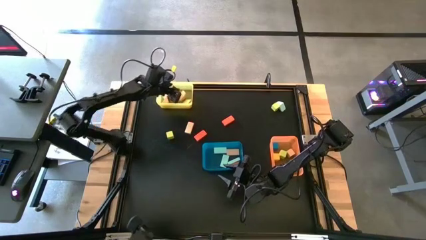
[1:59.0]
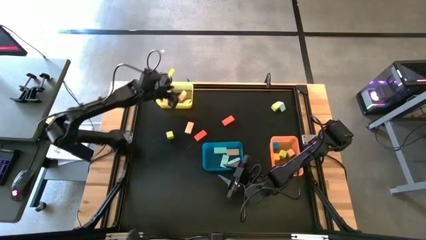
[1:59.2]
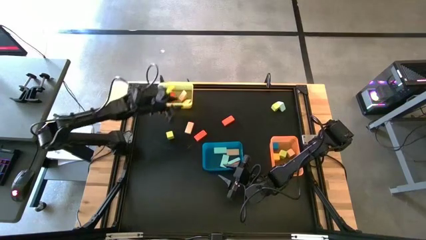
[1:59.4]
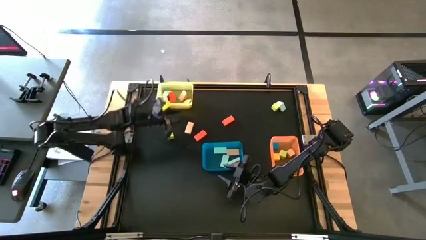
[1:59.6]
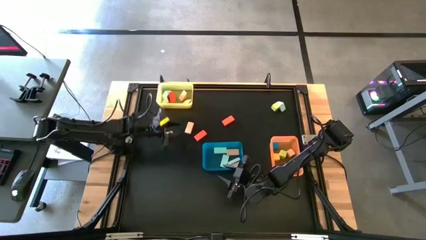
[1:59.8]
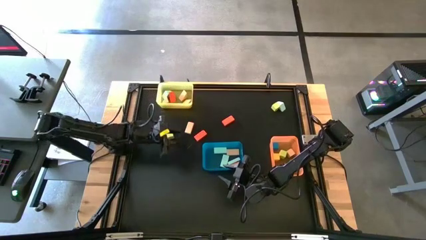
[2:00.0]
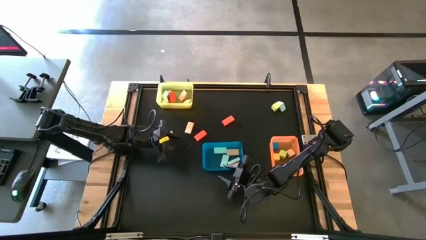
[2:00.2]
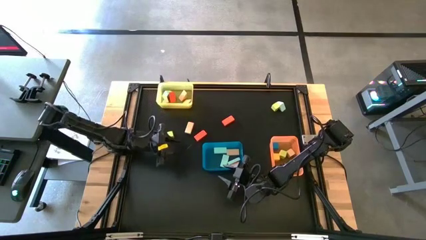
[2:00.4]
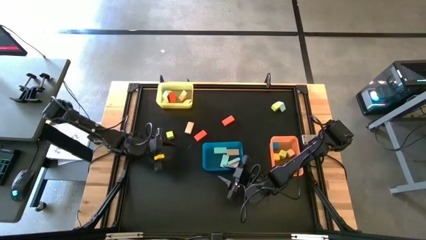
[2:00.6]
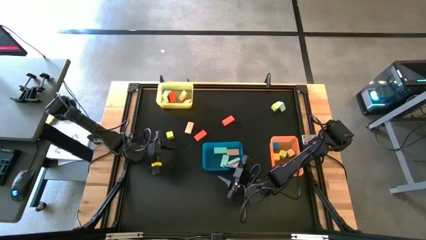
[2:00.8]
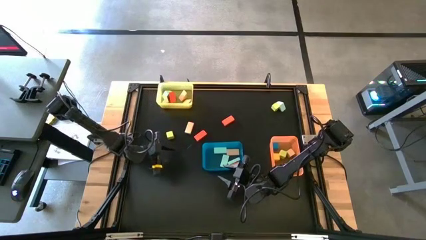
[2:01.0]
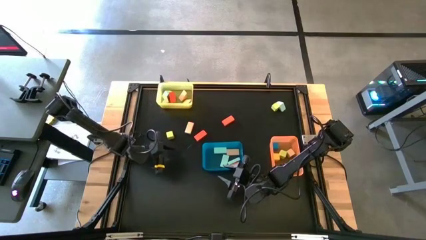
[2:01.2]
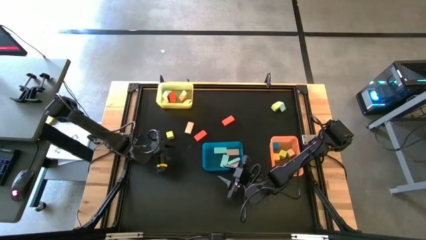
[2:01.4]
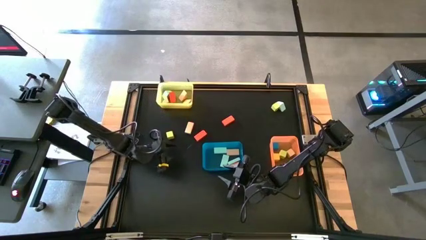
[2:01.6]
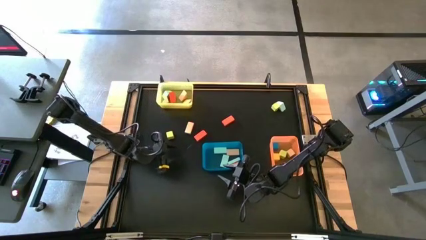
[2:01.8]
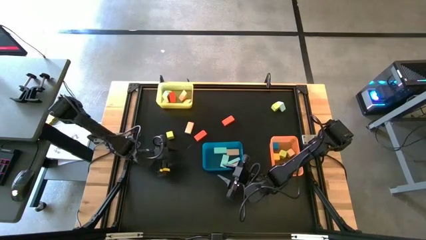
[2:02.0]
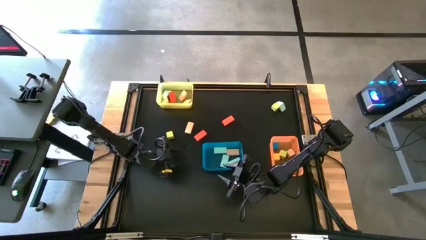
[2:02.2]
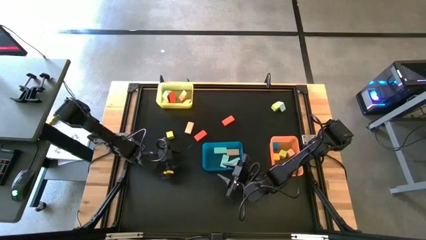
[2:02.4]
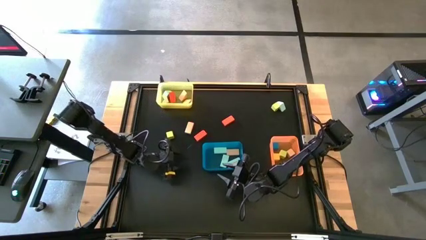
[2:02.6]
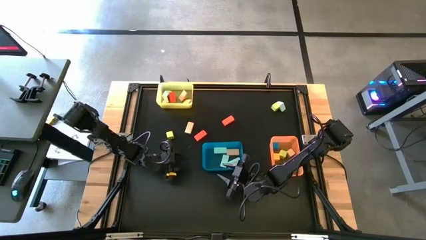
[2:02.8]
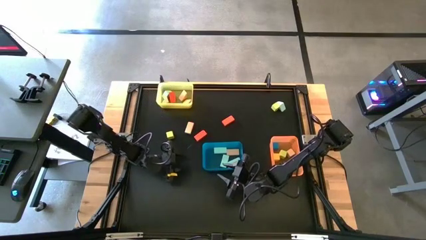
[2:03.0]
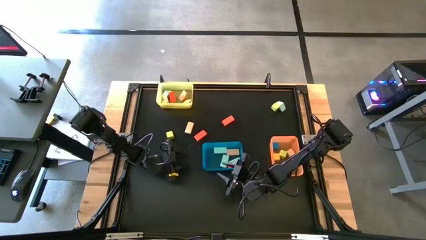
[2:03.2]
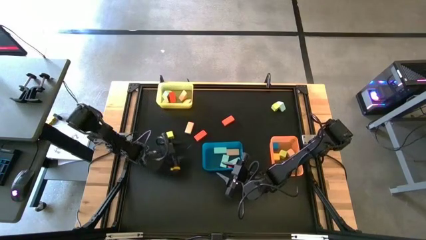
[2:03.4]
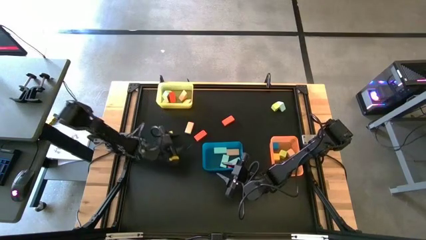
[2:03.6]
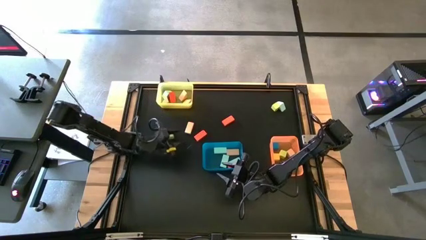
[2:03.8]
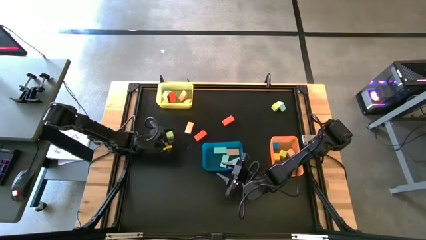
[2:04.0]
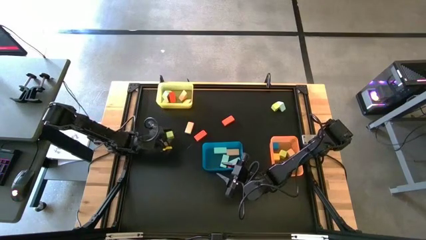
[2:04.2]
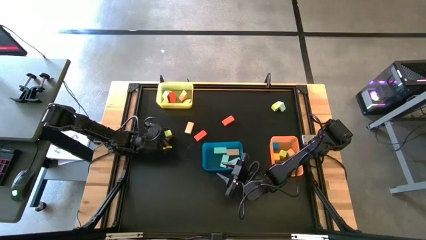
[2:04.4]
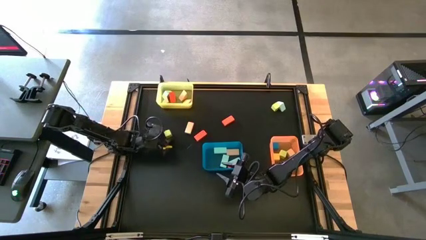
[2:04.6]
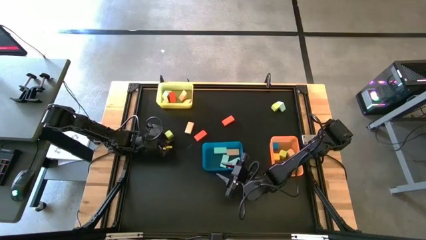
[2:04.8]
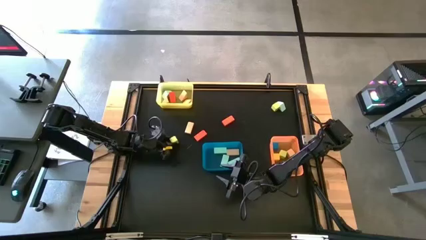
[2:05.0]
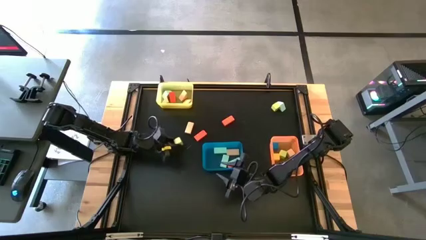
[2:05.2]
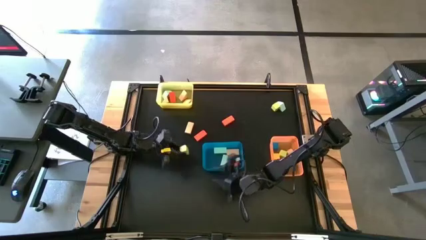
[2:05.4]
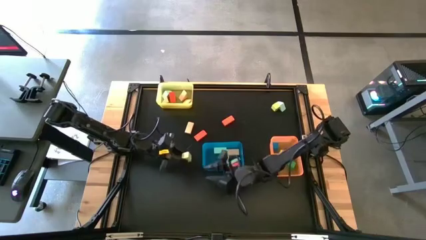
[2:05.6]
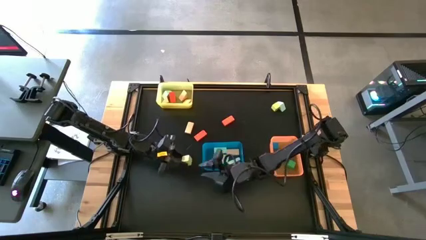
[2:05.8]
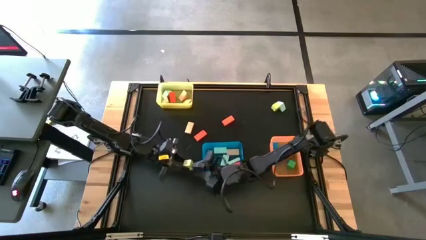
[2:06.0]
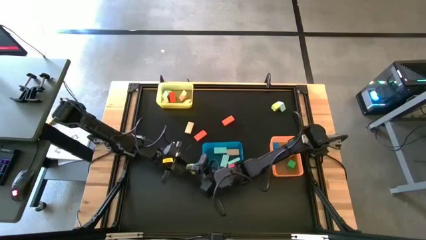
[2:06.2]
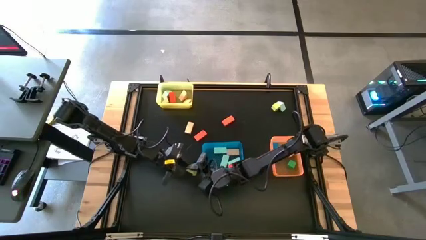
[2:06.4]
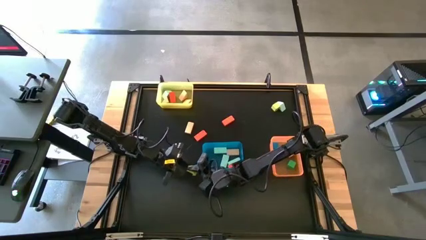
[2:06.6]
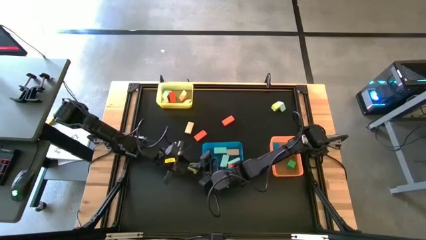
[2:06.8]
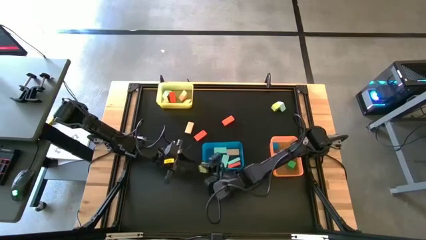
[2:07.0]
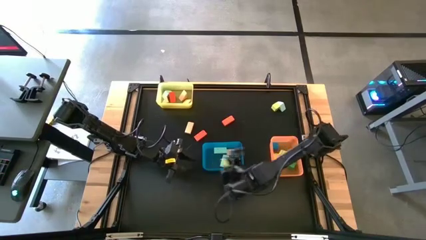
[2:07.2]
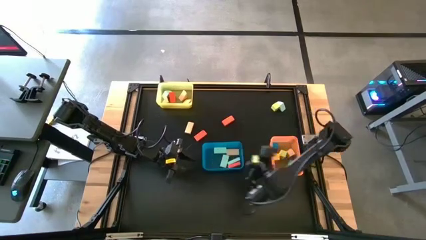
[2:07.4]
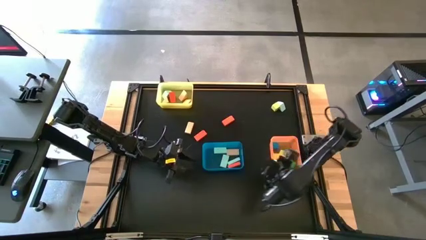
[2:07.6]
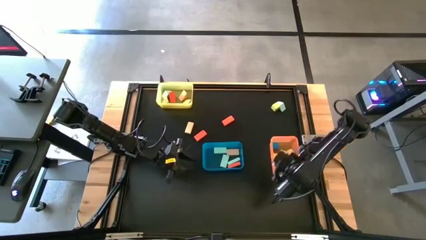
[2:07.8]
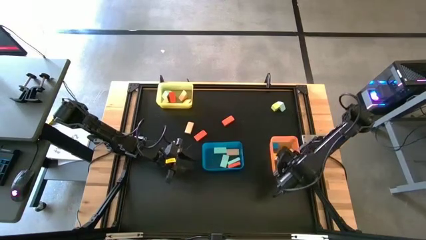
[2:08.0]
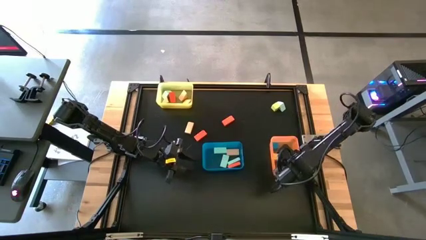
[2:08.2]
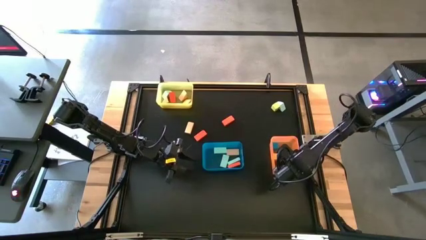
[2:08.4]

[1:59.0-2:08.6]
Task: Sort blocks by size
Put the light green square block into the orange bin

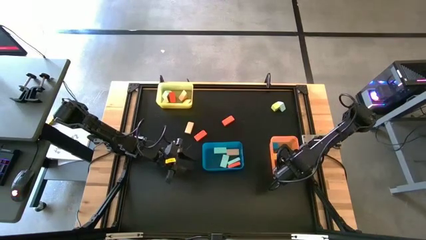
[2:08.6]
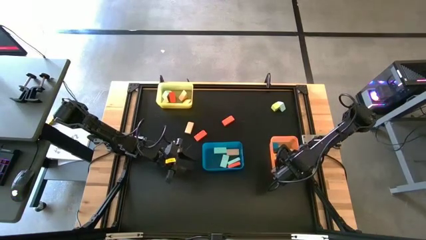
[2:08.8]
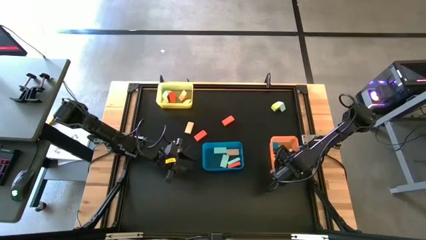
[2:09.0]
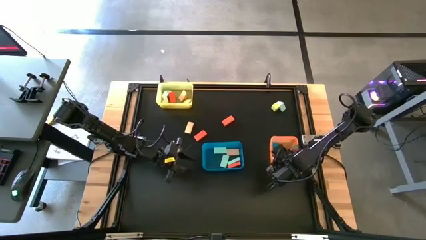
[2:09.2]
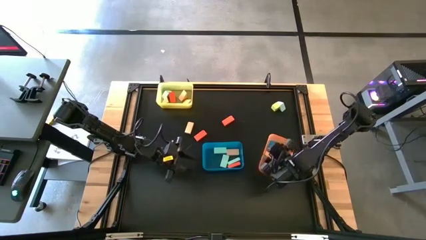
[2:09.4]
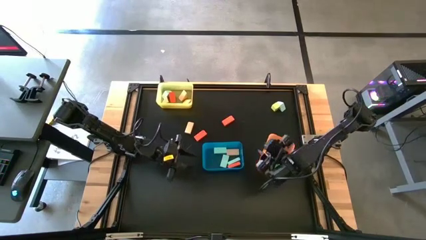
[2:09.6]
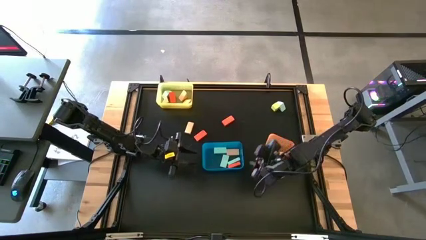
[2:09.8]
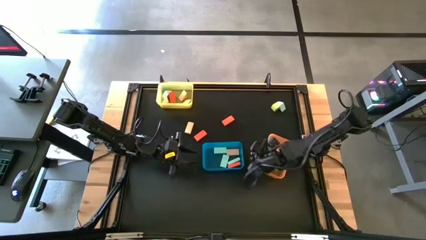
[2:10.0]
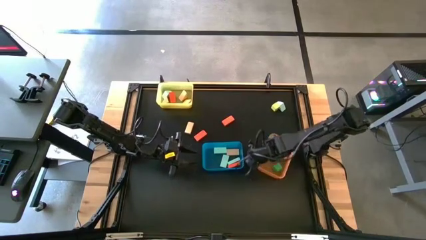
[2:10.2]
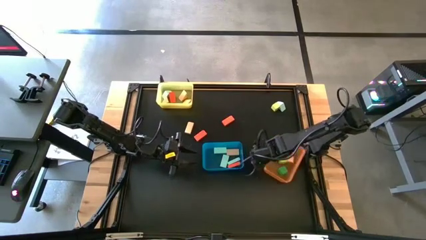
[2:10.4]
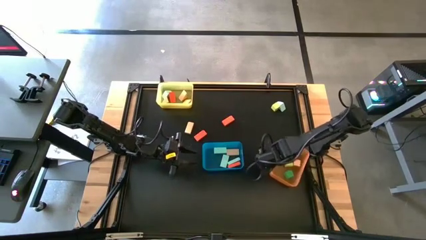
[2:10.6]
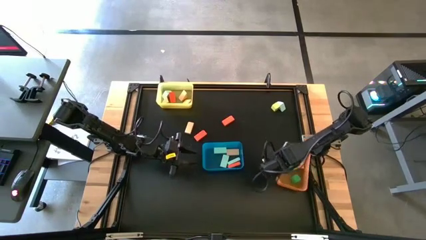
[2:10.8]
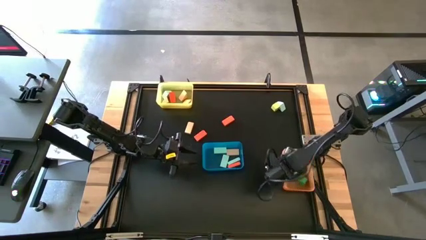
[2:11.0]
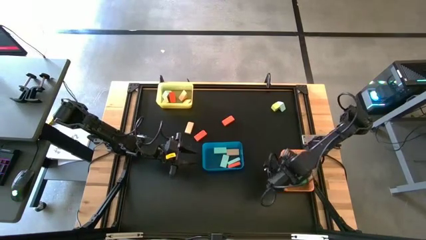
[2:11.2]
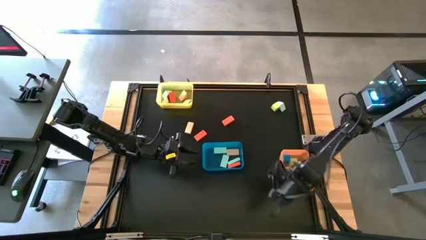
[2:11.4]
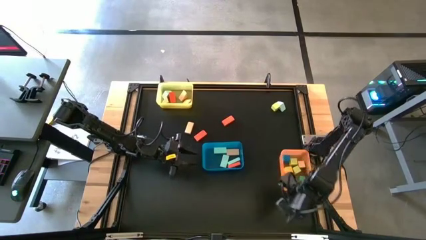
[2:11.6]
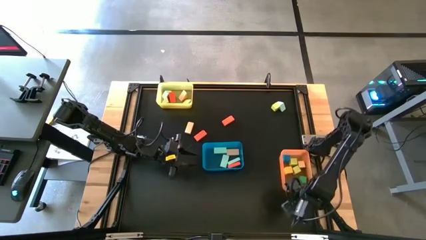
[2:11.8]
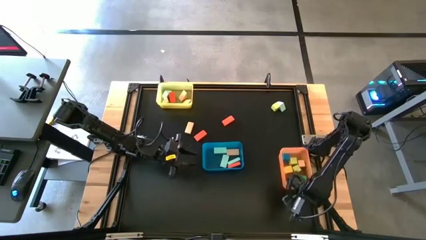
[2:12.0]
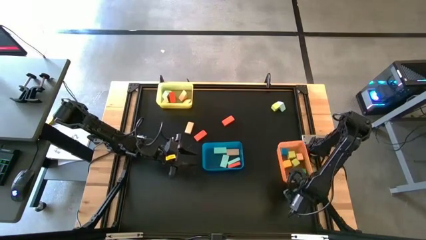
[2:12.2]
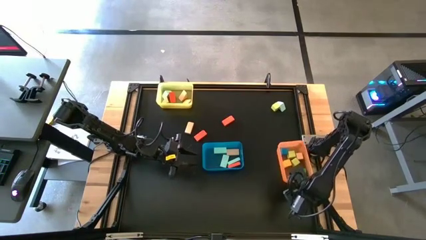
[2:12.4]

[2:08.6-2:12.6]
Adjust the orange bin

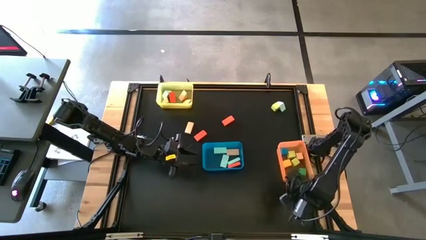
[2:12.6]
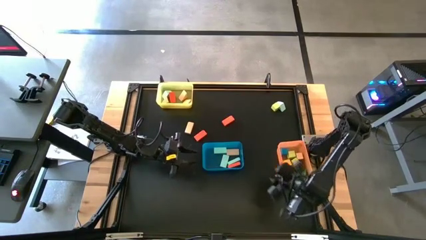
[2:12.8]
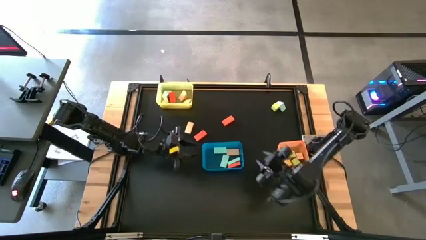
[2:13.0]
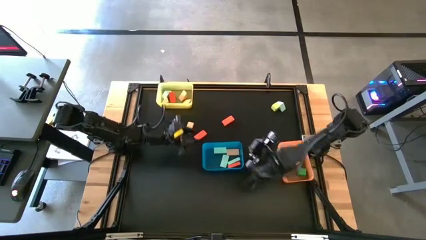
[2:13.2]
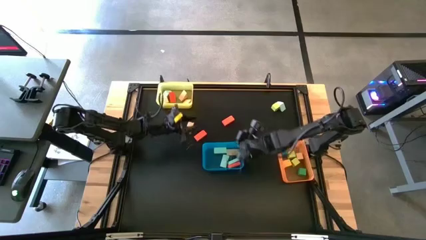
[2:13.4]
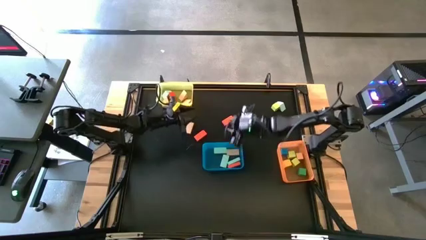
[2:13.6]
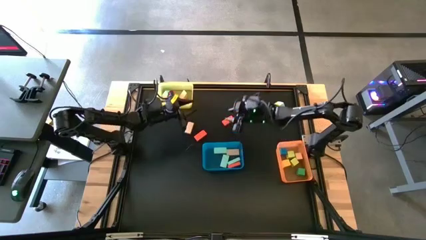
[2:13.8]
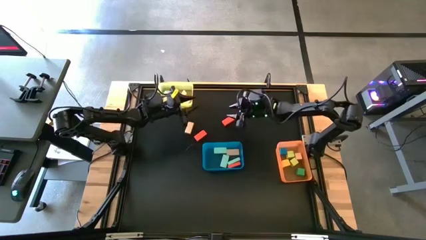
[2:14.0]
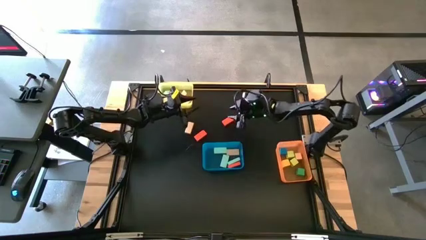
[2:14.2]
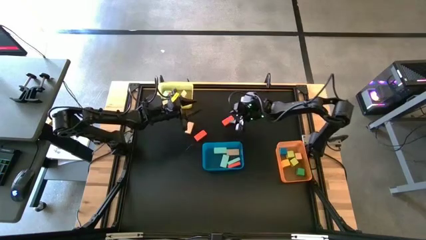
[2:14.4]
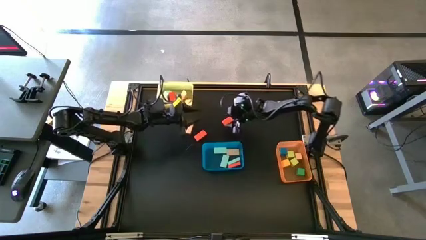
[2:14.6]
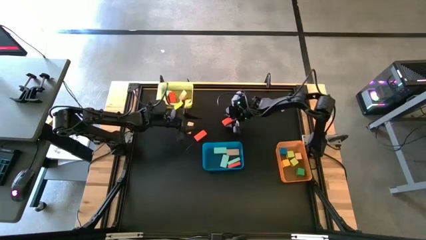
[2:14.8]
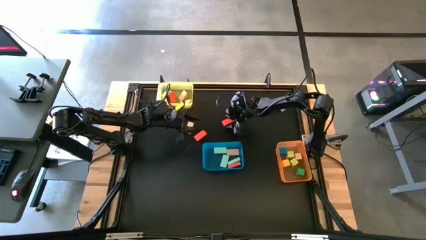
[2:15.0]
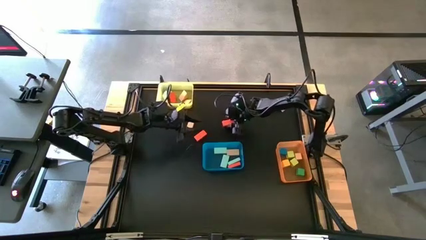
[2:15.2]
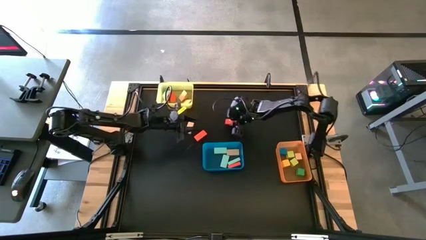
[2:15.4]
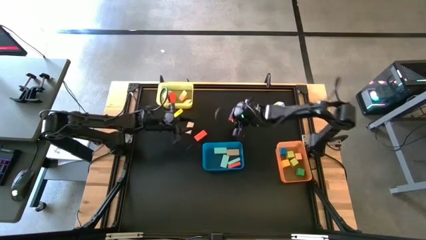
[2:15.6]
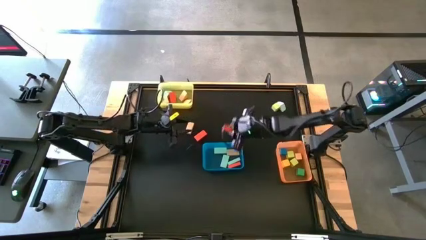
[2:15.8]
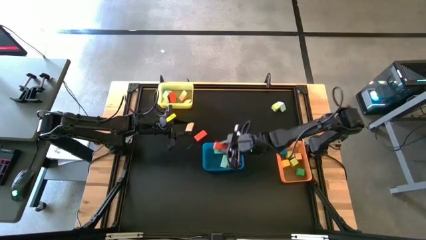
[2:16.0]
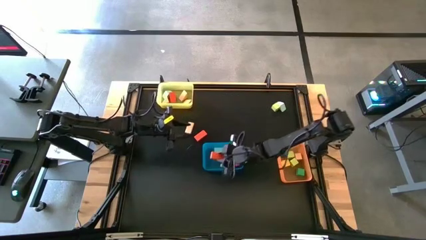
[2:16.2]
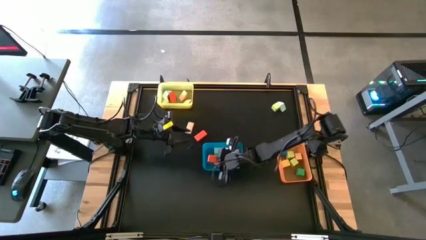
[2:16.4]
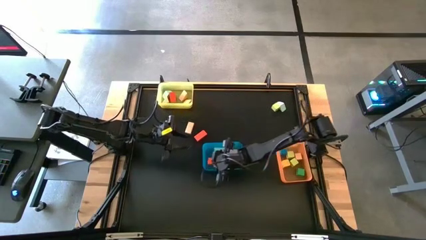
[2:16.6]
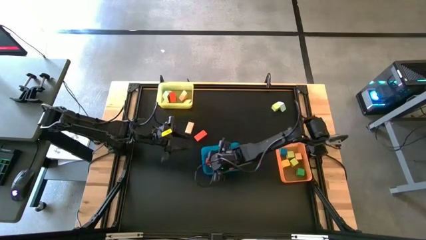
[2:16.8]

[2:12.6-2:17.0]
Put the orange rectangular block into the blue bin
